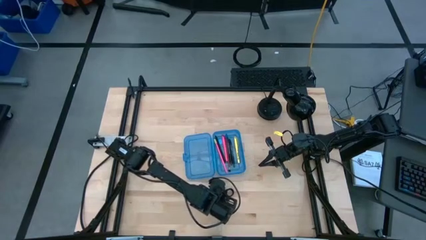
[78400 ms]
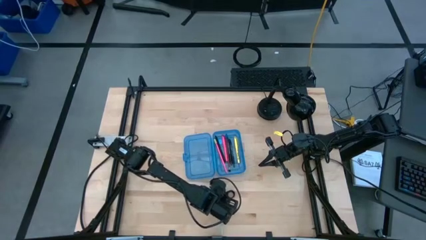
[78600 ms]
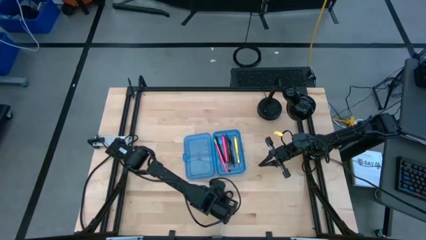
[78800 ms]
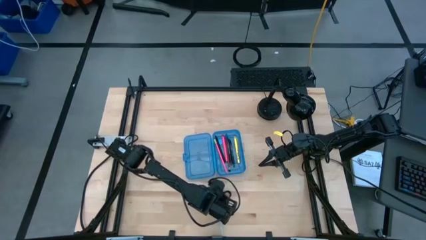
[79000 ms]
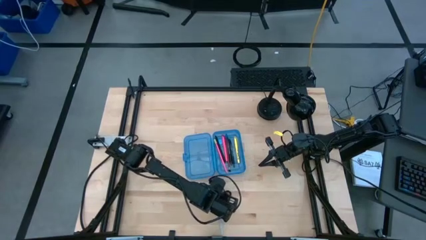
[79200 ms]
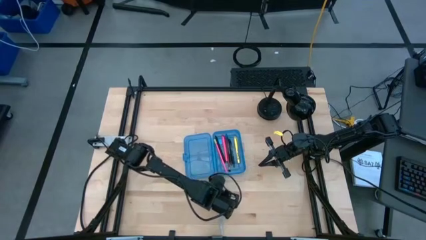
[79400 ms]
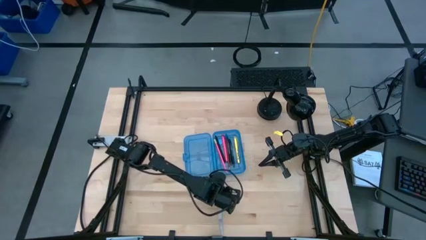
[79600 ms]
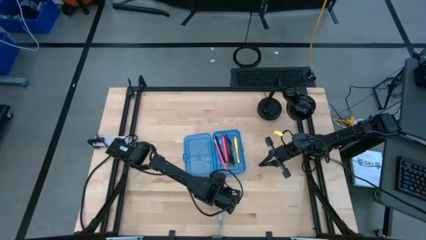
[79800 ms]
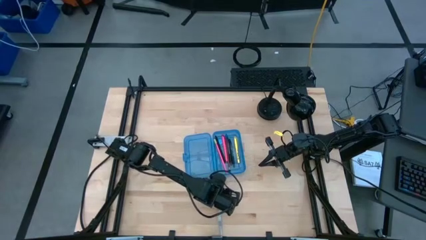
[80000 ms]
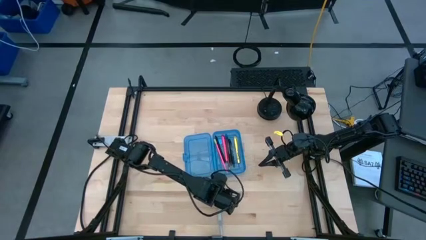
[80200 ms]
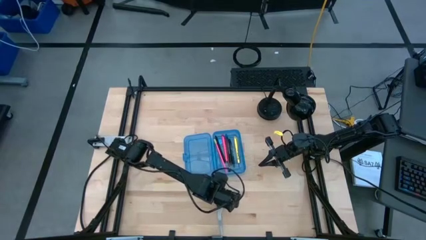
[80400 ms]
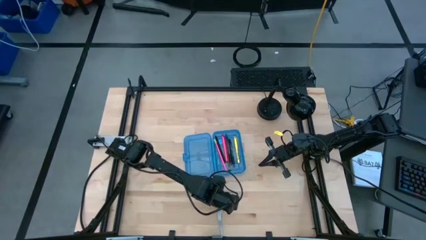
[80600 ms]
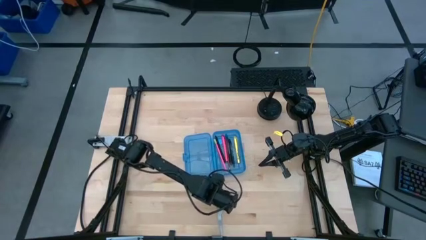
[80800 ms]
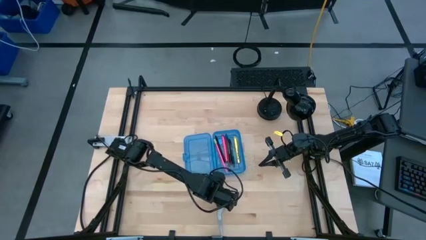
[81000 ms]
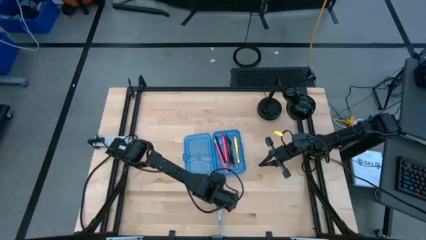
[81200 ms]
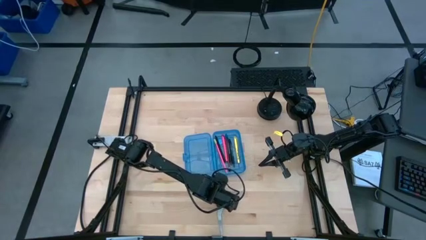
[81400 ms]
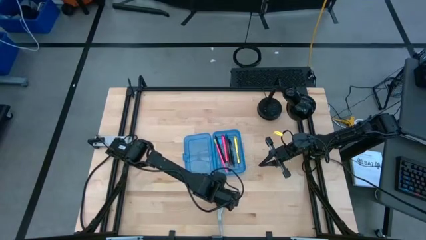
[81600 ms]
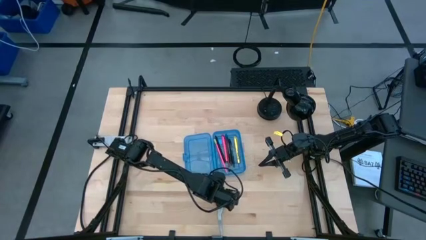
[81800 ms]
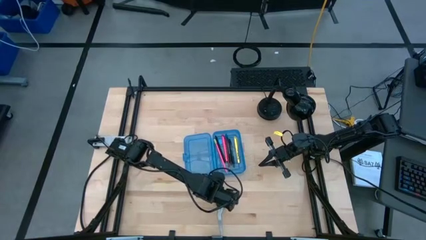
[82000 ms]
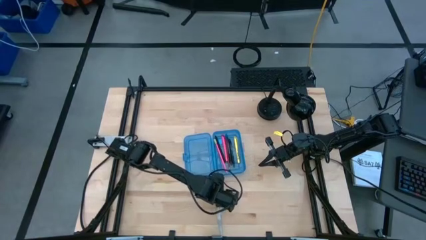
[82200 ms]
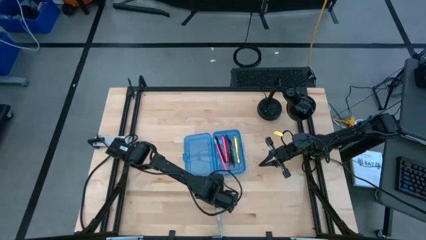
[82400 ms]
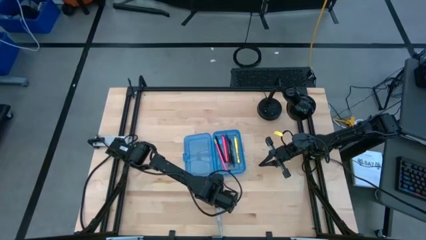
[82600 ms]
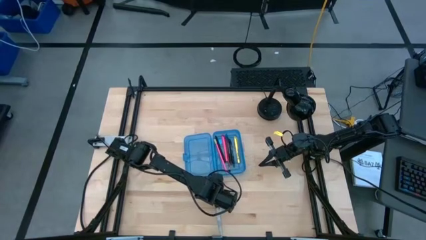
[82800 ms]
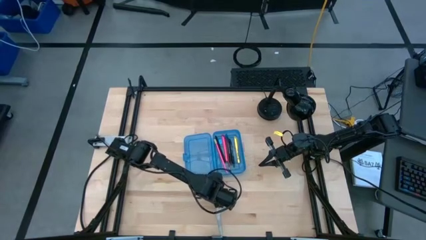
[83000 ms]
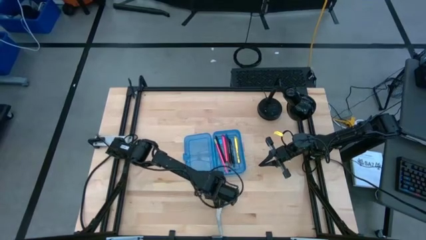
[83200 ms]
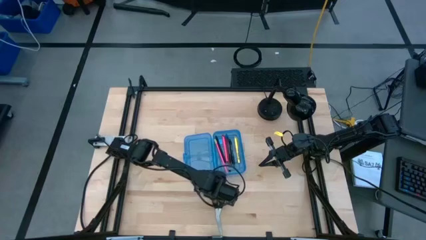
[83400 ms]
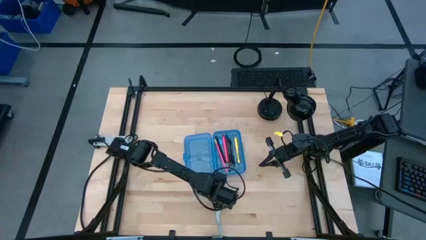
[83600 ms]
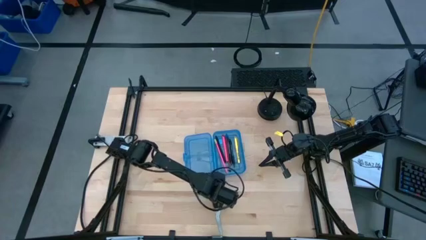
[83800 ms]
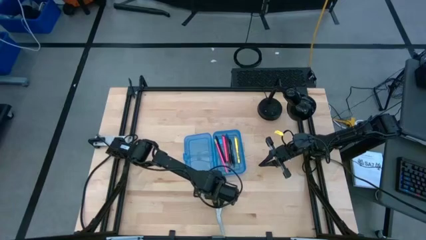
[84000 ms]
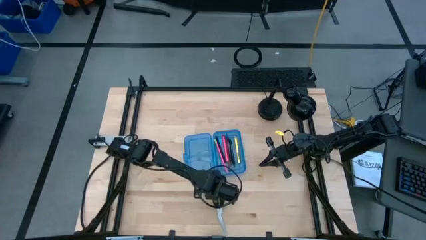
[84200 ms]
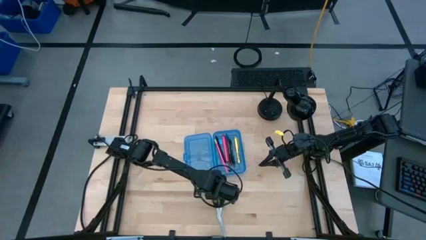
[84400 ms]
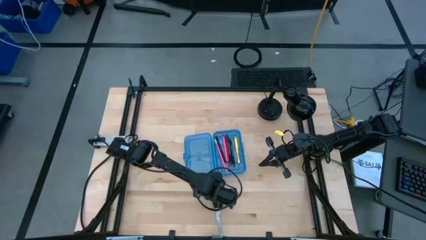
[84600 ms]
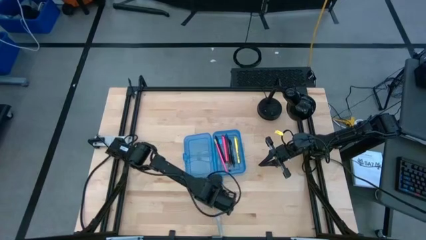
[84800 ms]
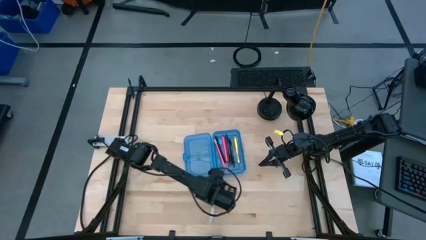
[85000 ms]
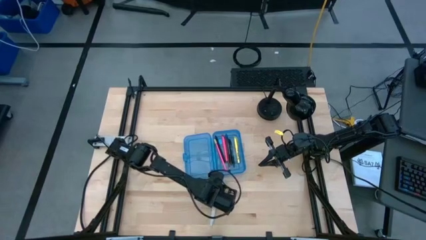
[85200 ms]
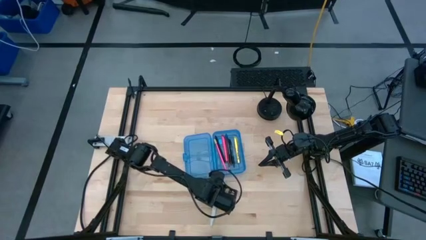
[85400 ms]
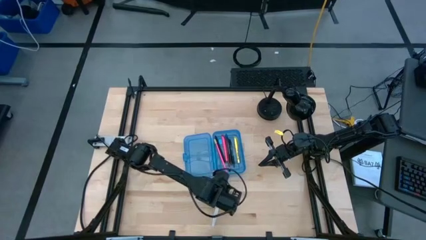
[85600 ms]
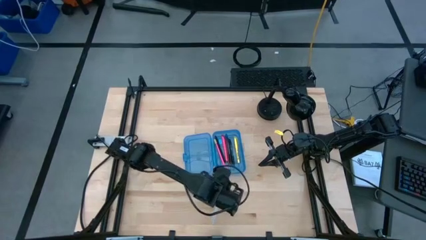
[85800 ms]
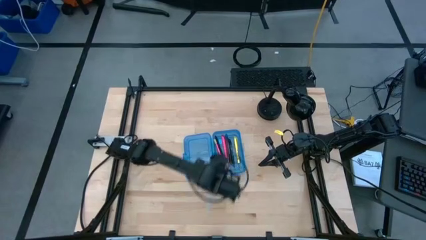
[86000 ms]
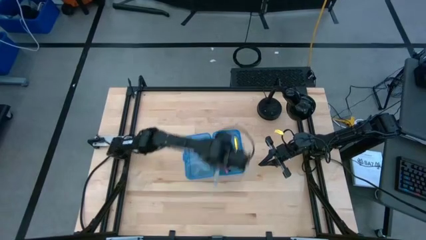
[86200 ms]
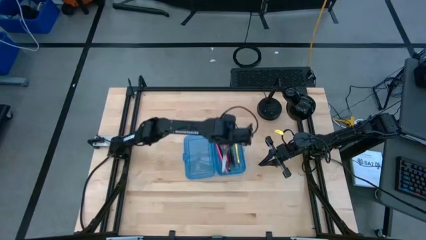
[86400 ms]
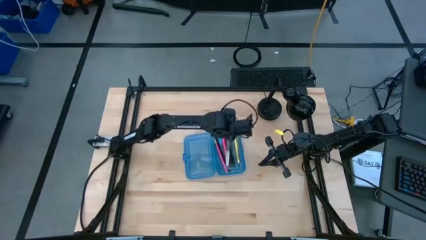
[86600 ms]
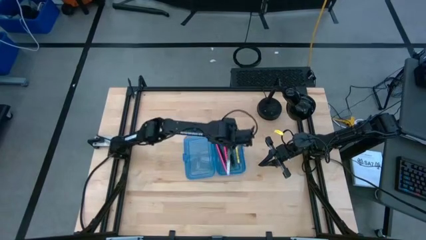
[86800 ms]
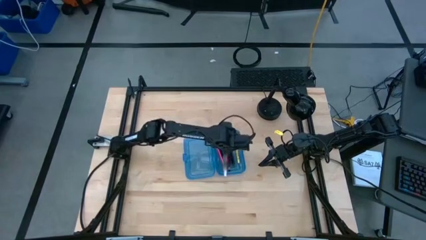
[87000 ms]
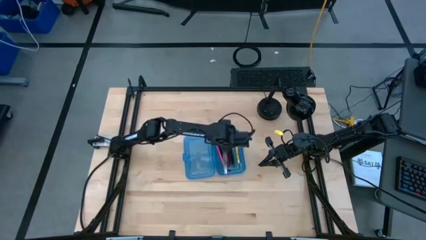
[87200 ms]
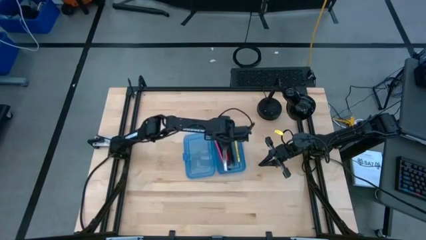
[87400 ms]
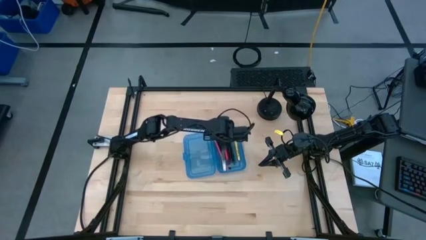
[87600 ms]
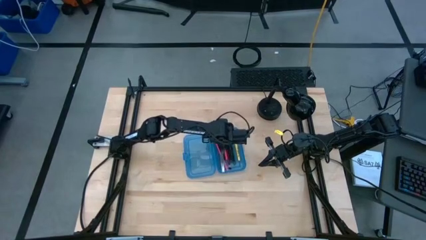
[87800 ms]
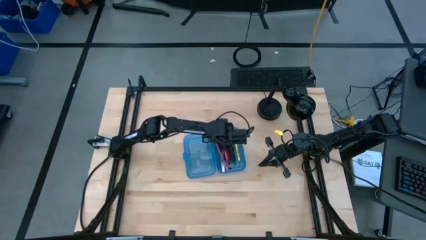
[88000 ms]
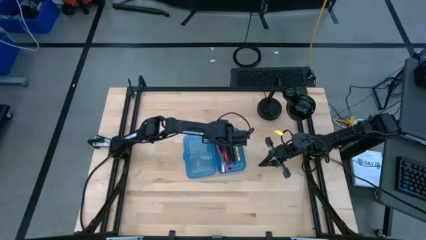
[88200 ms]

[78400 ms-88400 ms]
Task: Pick & place school supplies into a supply box
Put the black scissors into the blue supply box
